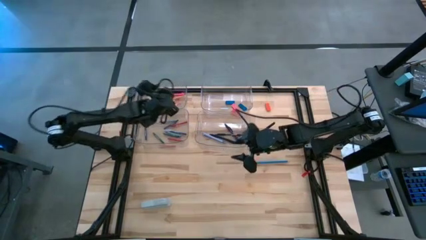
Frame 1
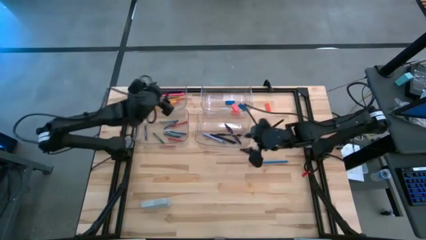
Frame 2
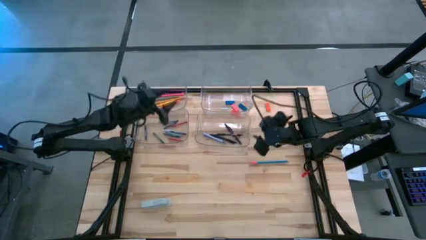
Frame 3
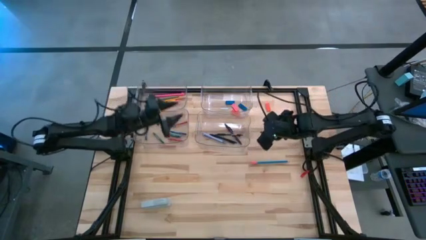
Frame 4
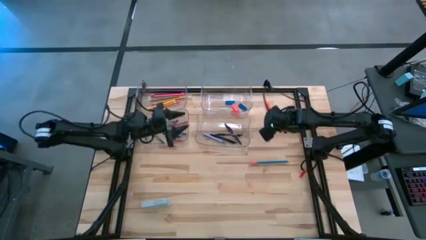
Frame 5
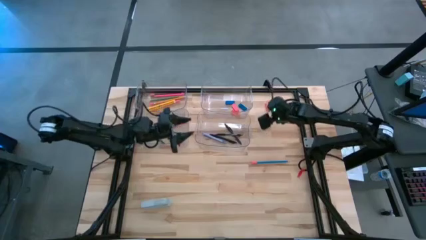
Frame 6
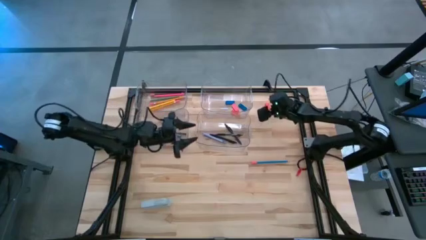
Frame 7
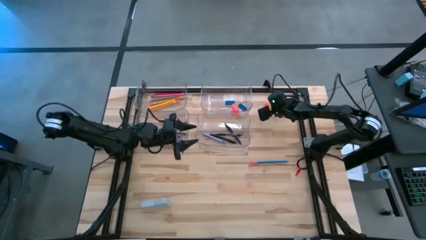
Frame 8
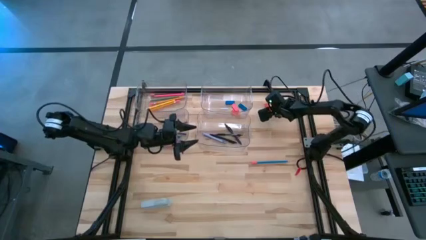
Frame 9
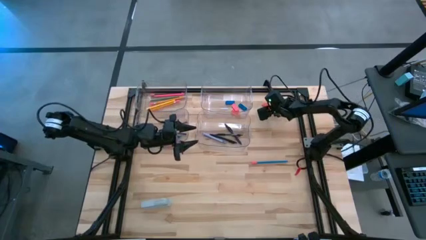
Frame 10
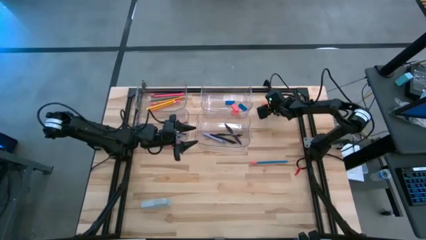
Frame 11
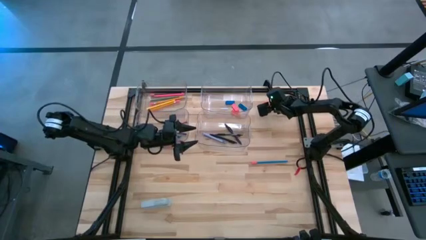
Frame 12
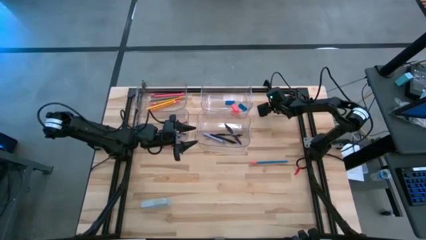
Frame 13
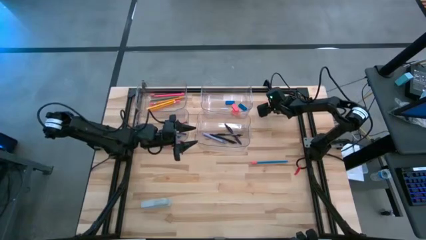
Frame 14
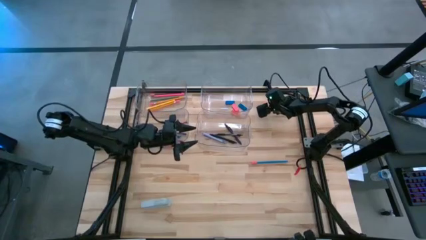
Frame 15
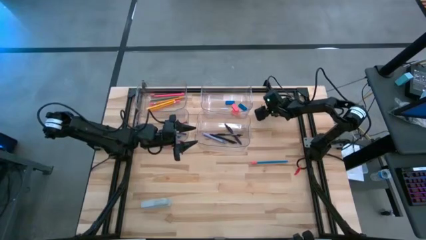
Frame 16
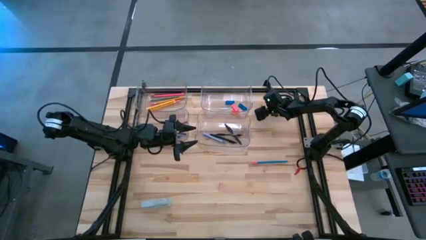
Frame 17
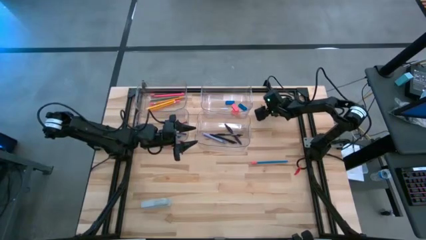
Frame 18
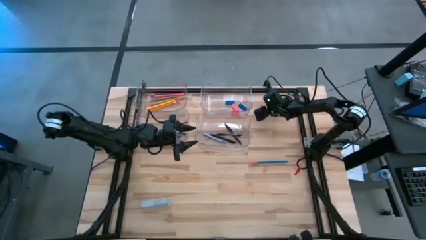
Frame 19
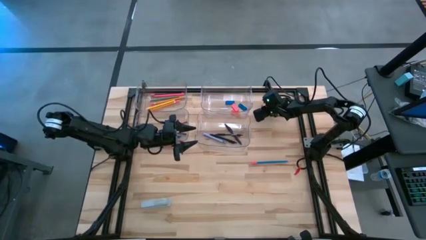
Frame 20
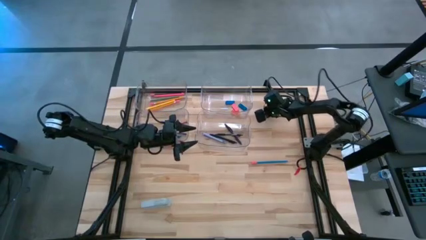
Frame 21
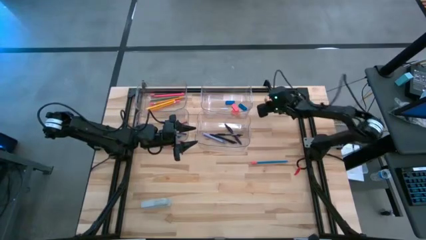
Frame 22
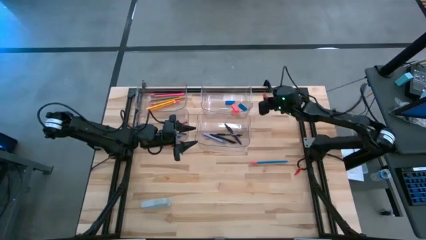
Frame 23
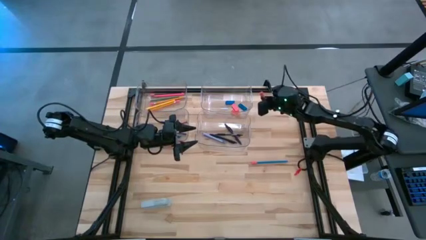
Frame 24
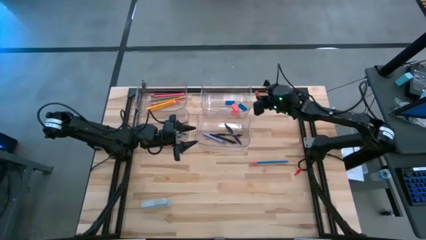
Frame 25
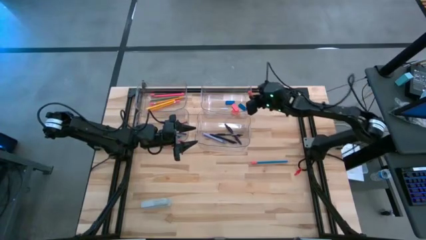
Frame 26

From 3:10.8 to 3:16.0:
Task: Sort crayons/erasers/pens/pencils in bins
Put the orange eraser into the top right transparent bin

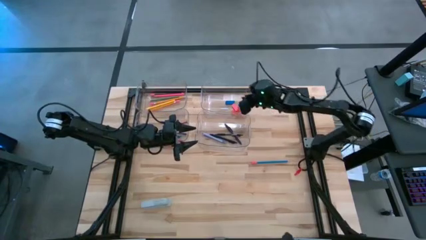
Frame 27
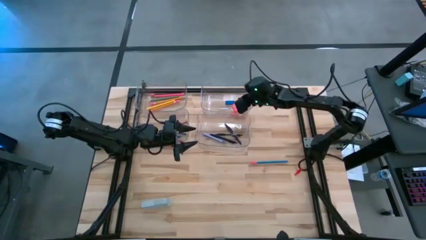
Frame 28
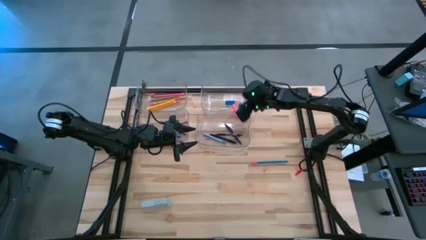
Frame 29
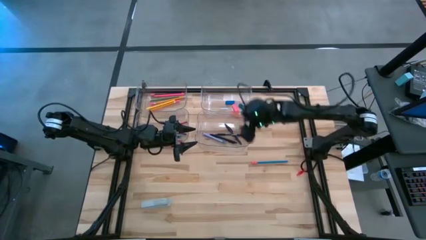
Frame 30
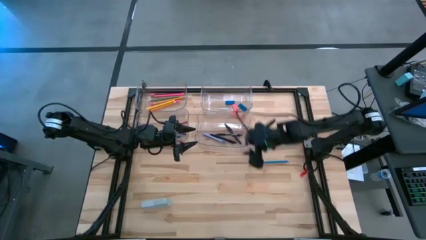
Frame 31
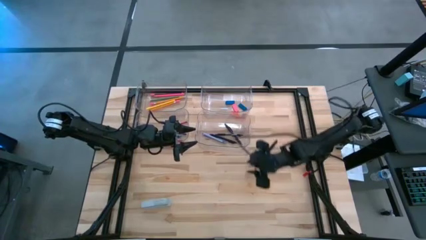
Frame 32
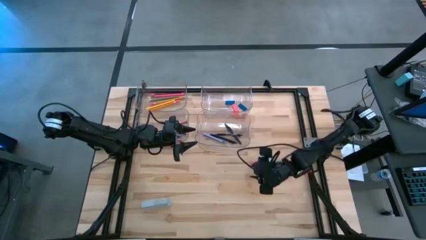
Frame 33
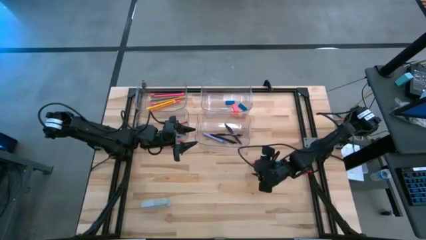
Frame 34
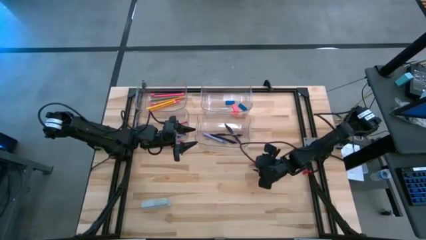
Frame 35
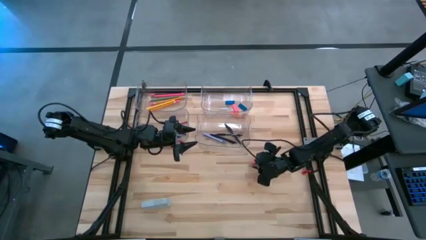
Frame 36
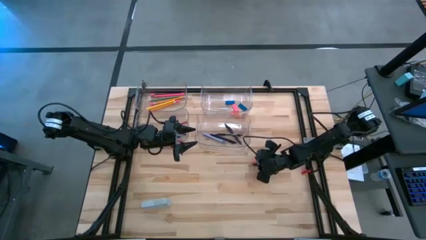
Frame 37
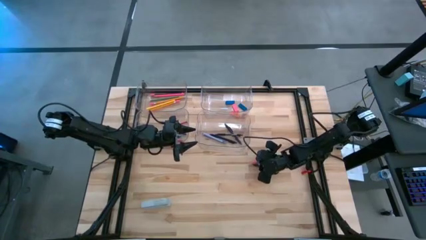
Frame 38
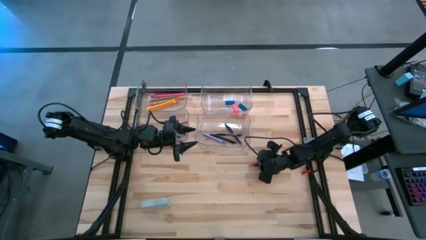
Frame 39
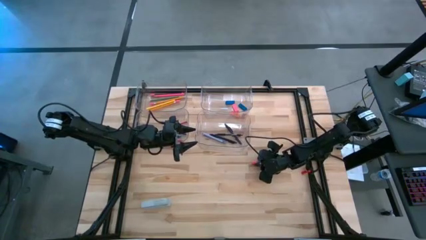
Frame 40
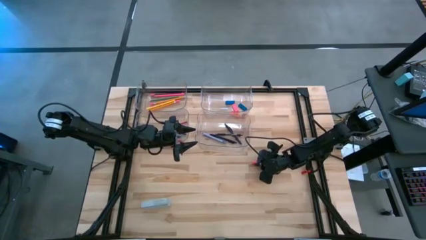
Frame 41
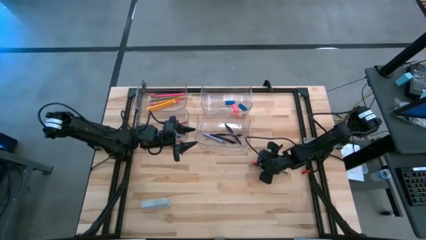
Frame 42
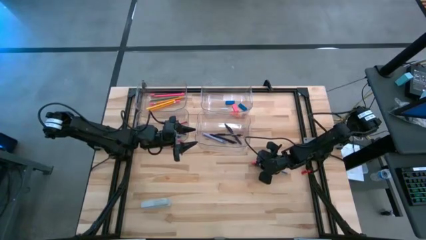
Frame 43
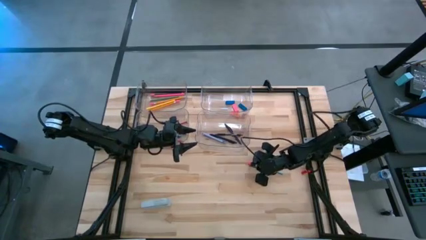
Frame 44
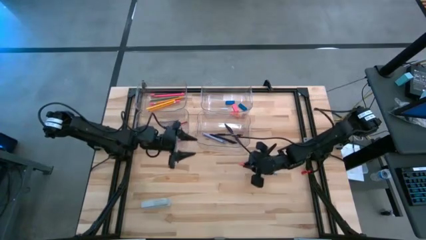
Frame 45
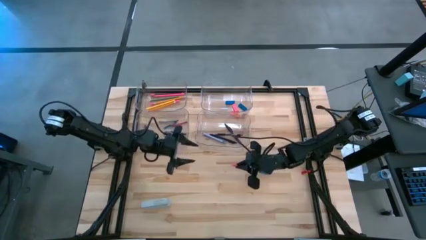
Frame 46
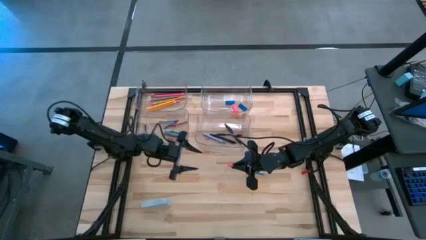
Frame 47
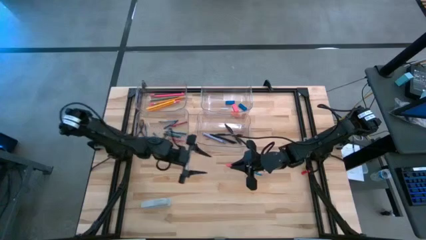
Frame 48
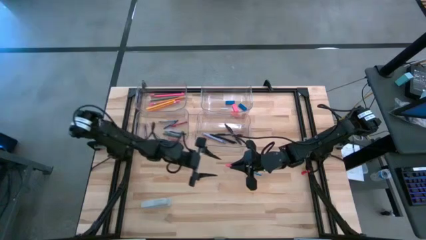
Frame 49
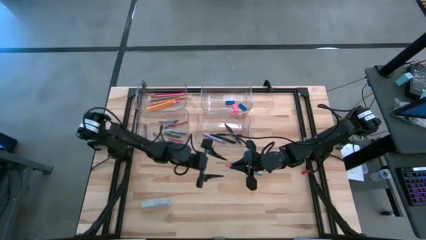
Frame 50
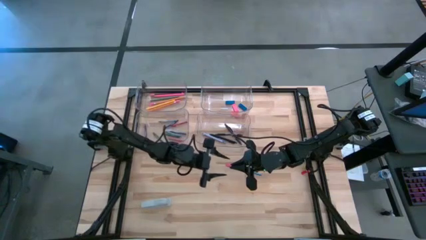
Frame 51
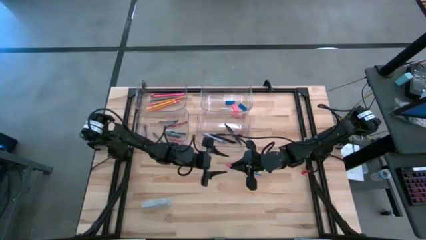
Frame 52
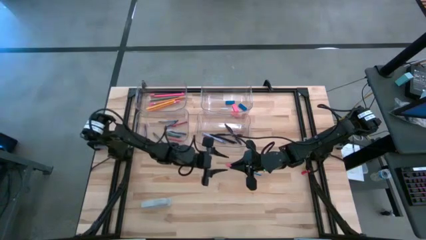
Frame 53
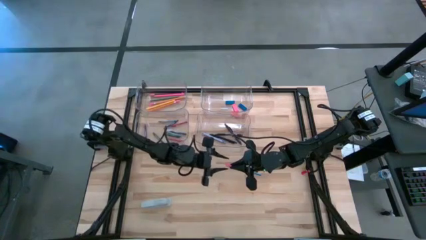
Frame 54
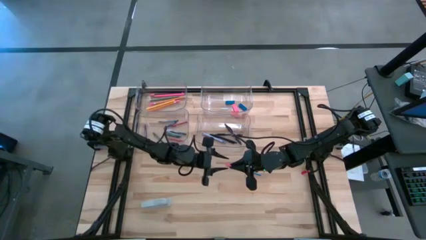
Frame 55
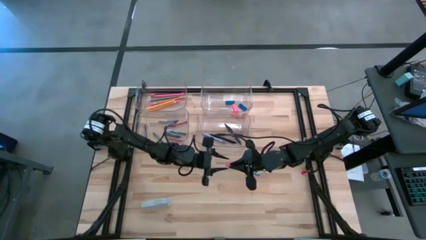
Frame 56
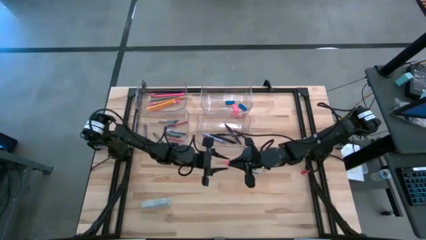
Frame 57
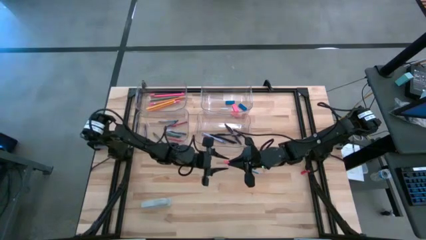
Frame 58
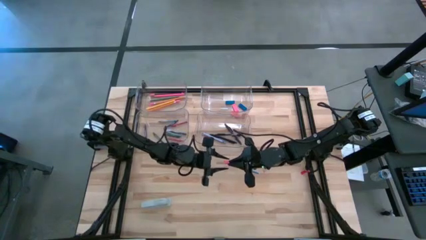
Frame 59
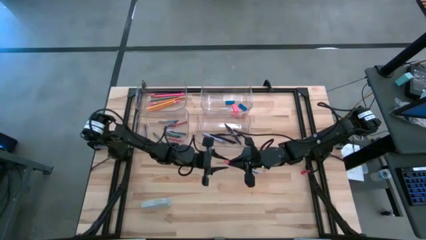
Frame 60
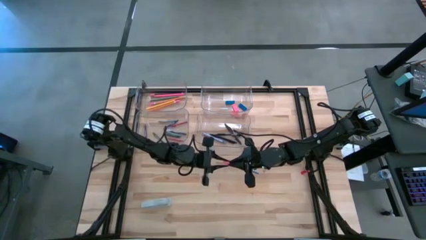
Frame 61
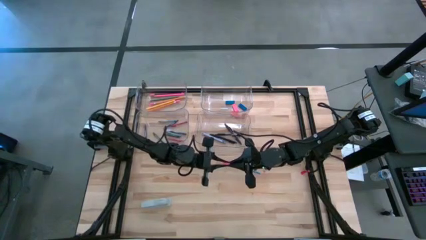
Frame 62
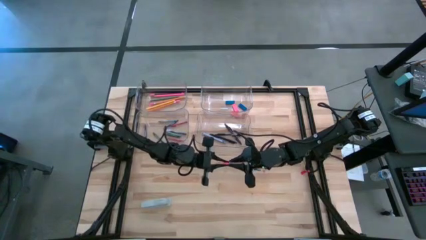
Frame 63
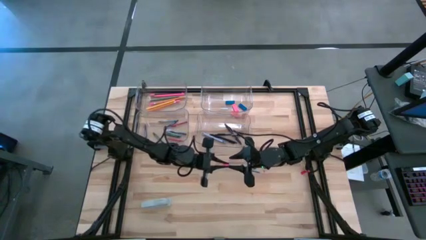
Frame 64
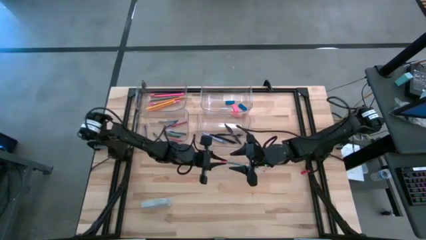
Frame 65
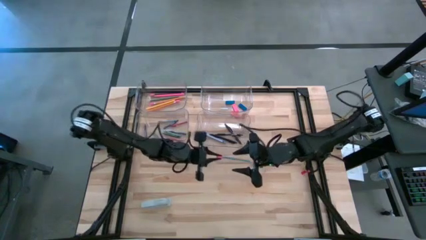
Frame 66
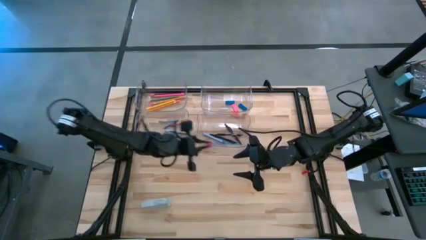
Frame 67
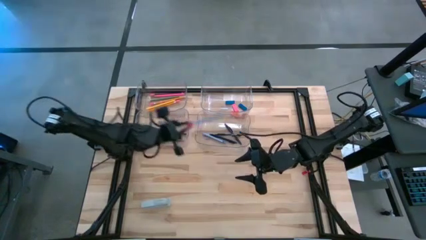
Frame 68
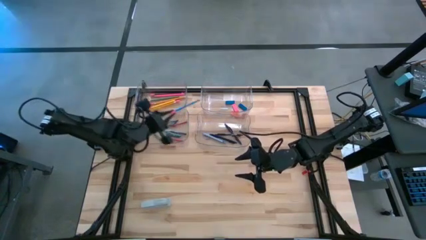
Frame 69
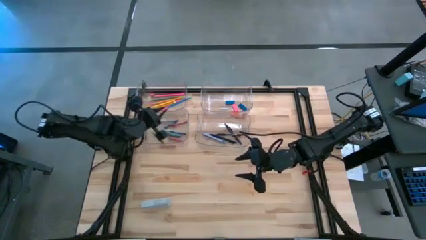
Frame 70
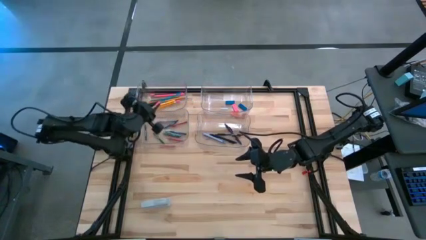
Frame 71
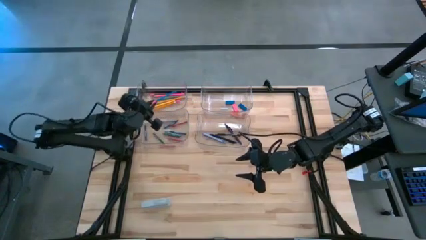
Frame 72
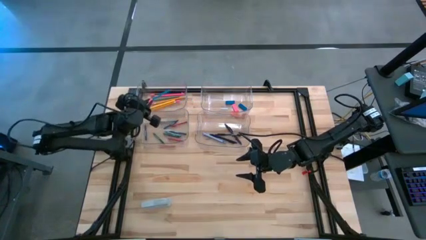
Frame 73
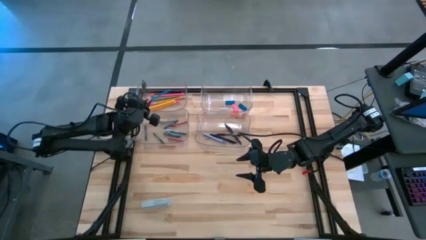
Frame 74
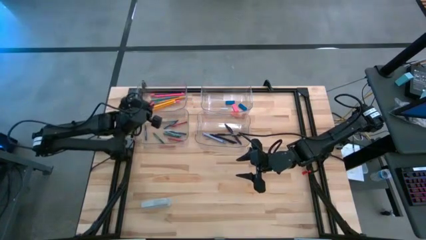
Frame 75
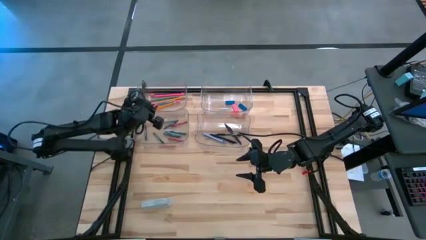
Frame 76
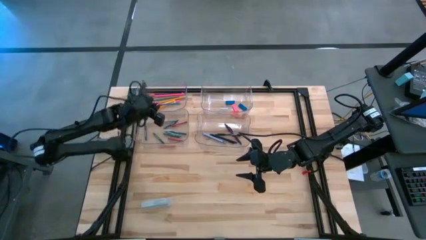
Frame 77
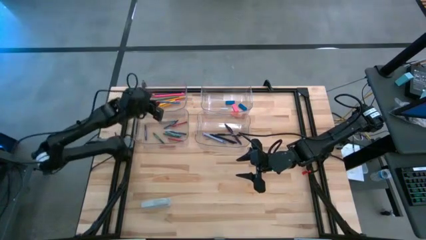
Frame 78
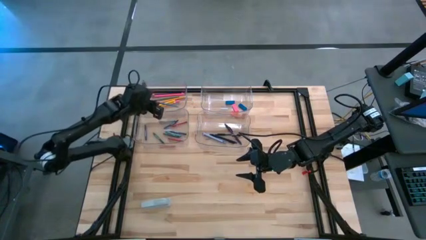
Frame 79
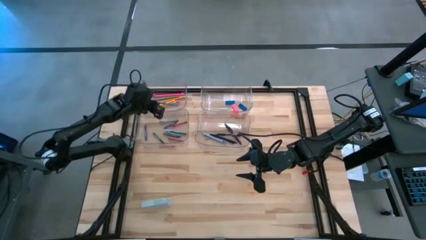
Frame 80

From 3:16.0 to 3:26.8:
Put the blue pencil into the top left transparent bin
